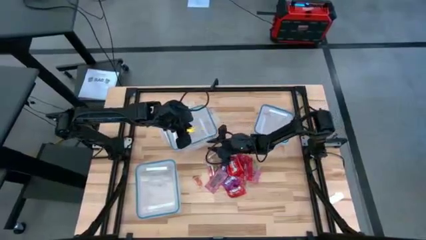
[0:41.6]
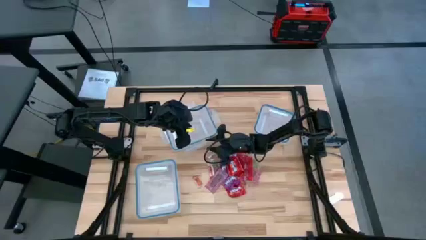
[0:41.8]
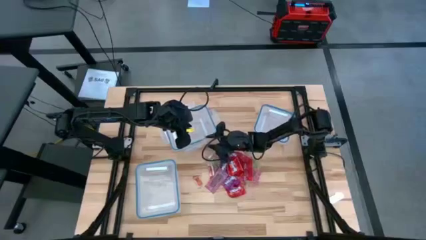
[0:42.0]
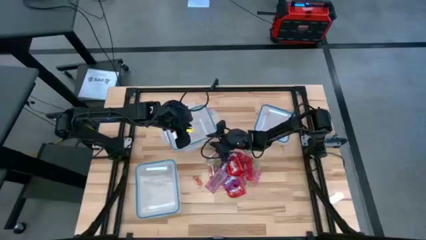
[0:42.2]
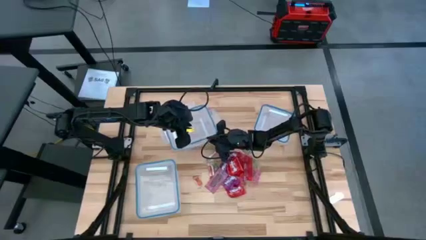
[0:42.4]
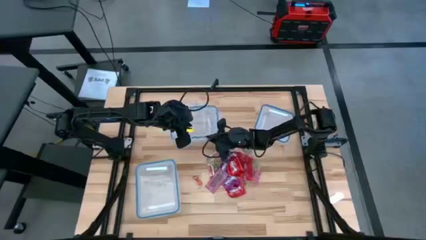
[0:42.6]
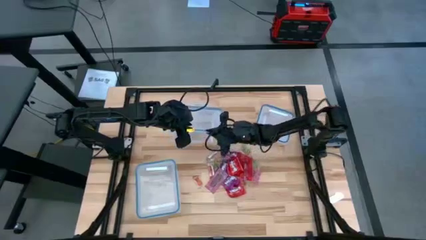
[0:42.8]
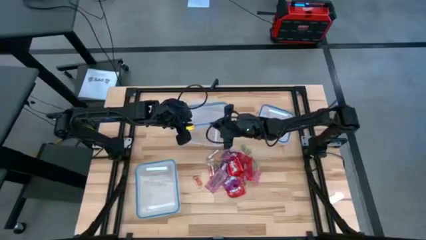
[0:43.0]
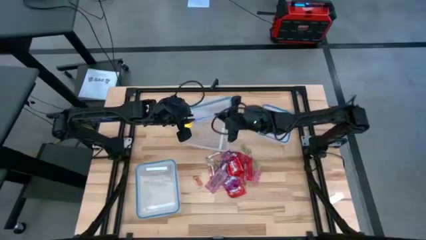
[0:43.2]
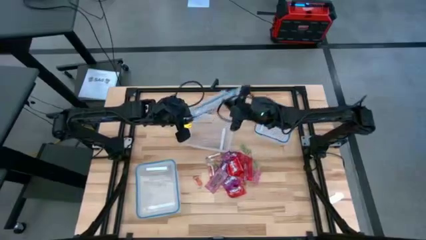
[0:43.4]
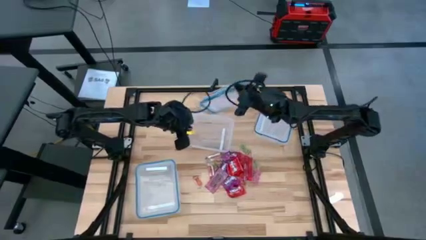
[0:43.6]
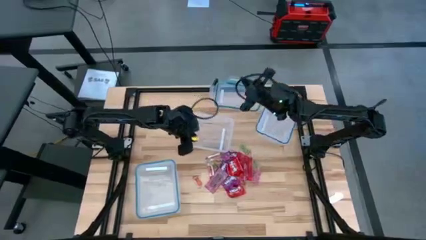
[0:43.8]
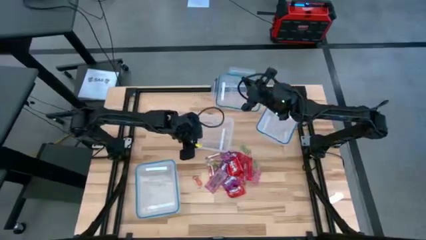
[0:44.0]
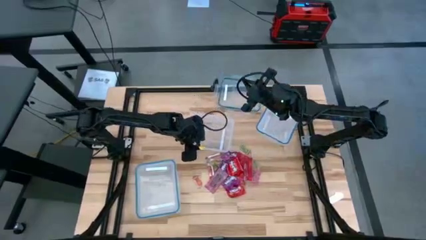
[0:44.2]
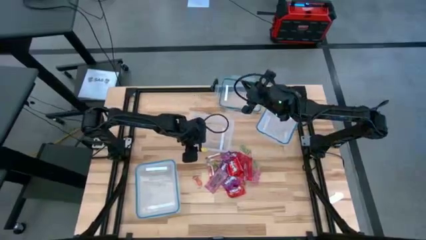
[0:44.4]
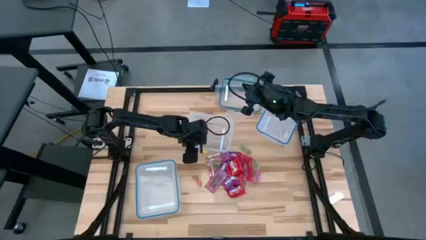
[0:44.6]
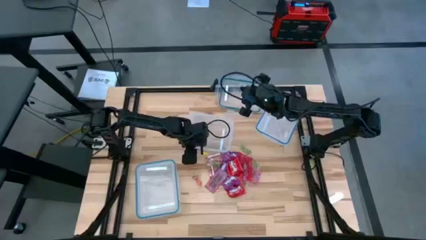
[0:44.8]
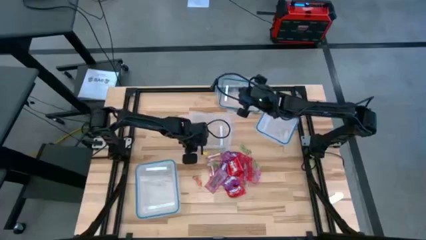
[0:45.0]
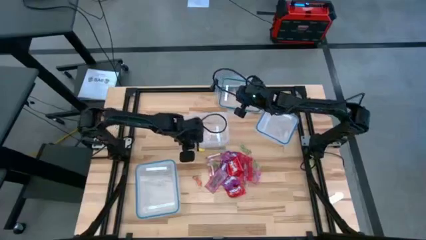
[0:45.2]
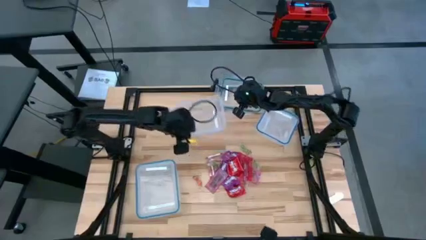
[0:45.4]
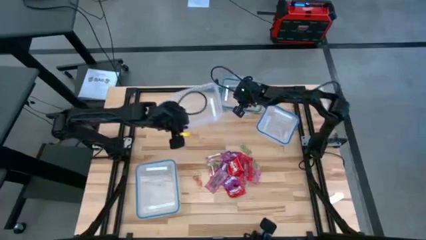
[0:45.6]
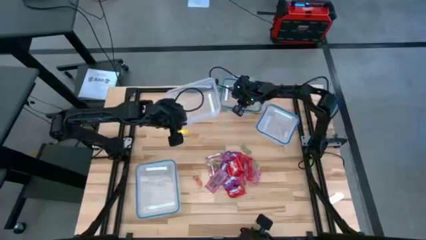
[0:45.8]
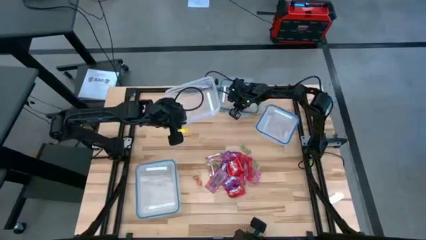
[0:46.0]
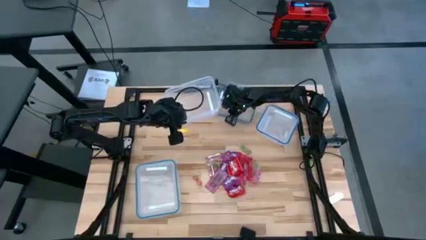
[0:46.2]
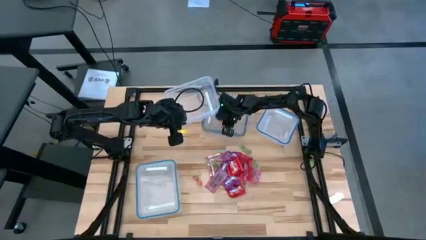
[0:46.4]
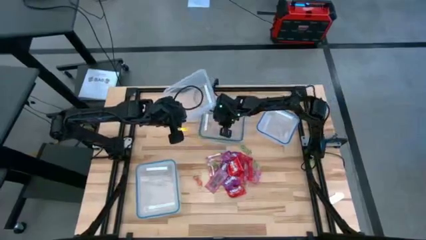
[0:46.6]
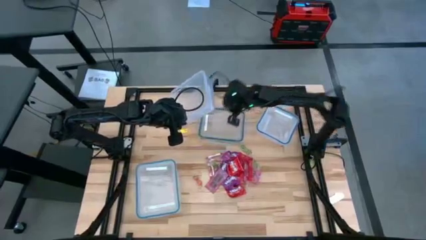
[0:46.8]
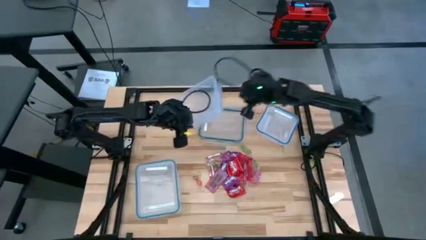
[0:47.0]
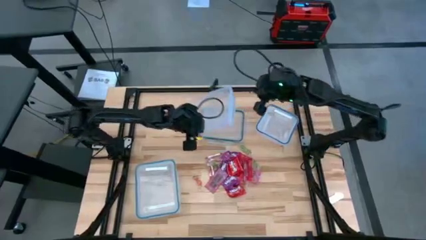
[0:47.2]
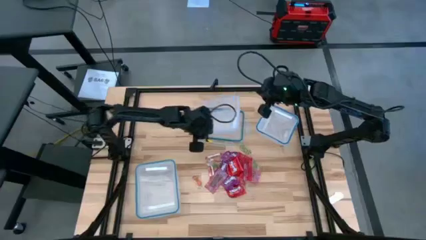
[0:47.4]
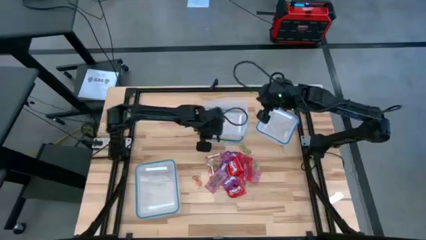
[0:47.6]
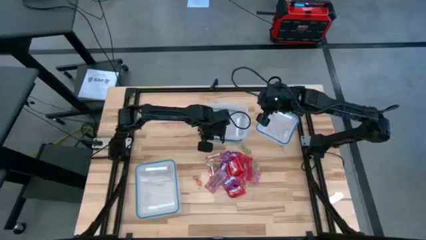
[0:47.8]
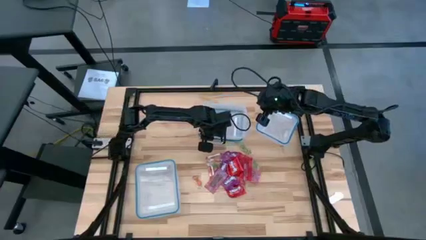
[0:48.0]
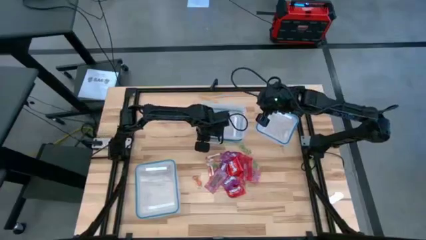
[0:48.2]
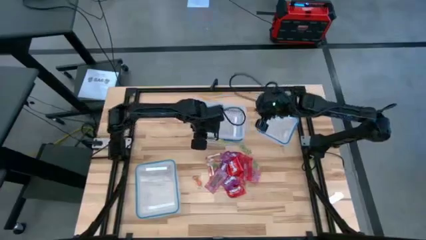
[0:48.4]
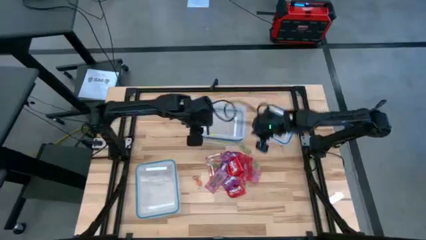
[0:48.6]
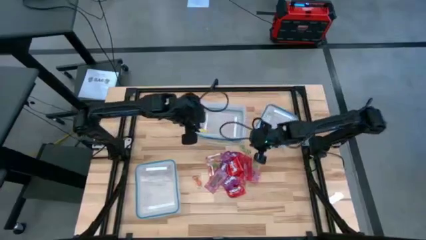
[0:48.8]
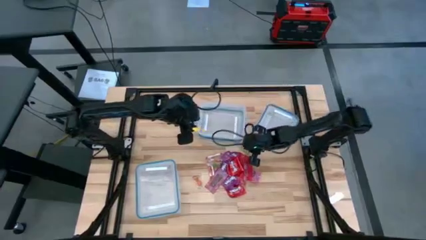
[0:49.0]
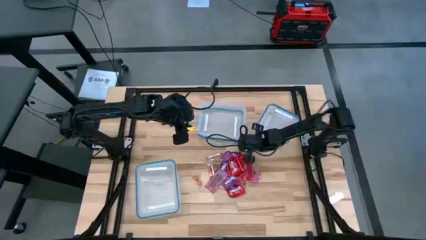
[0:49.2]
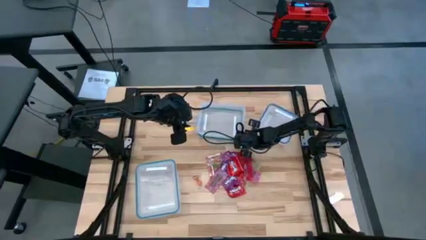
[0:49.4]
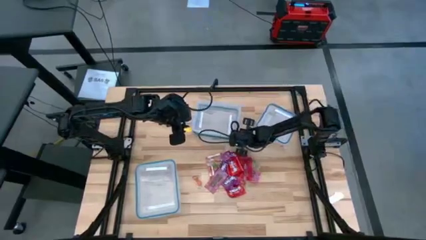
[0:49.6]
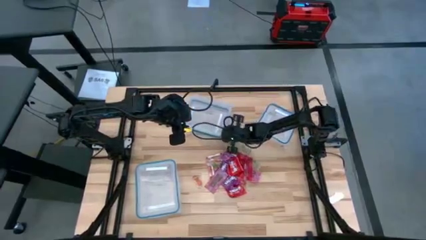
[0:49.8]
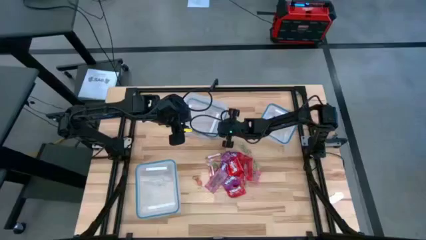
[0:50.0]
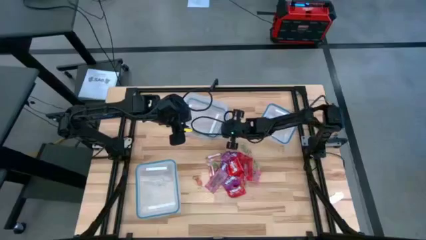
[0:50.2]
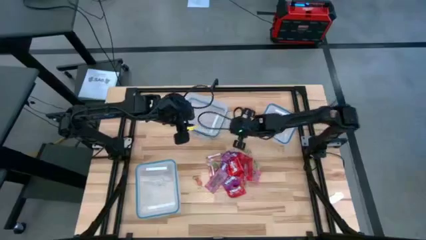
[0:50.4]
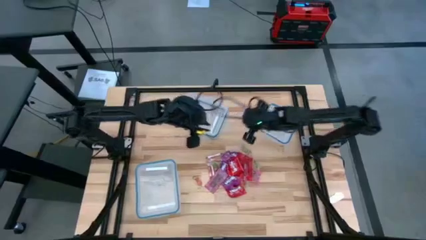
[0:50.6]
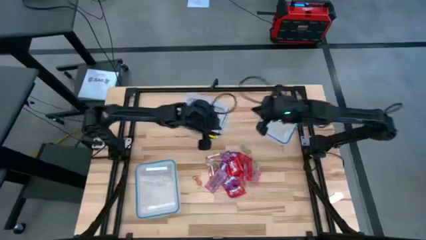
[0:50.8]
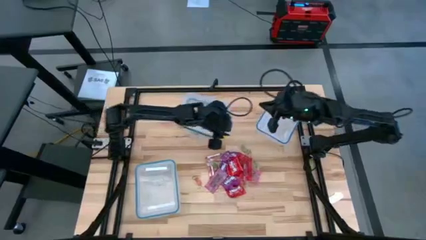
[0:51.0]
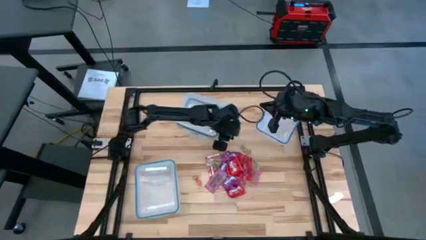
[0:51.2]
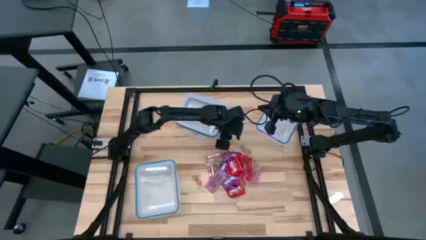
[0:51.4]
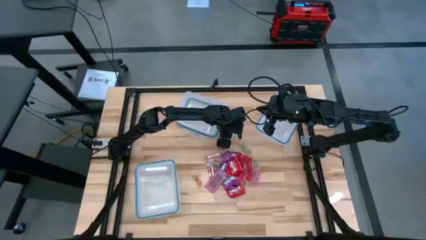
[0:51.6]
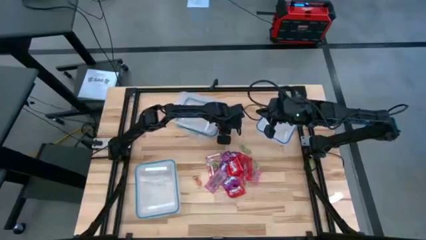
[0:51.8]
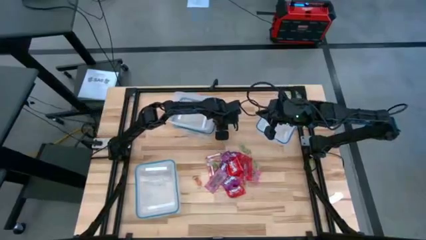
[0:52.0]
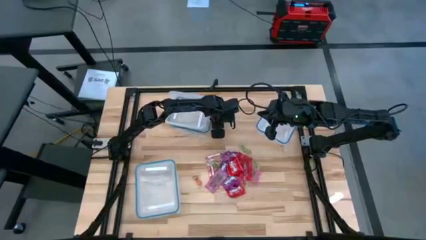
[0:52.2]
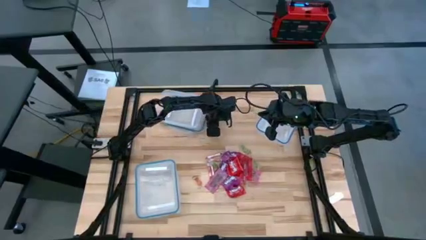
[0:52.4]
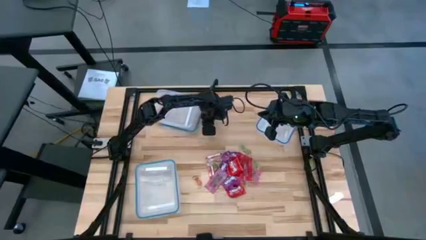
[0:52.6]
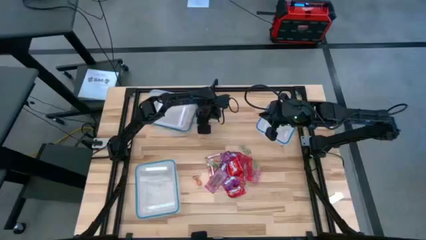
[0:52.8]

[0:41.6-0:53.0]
Task: Sort candy
Open the top left transparent bin
